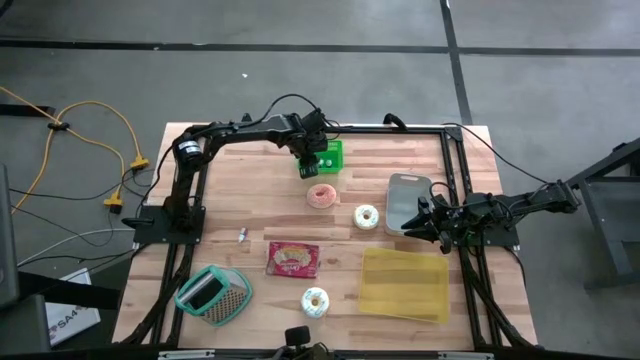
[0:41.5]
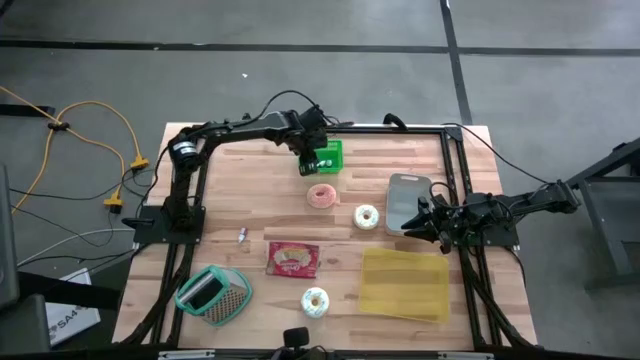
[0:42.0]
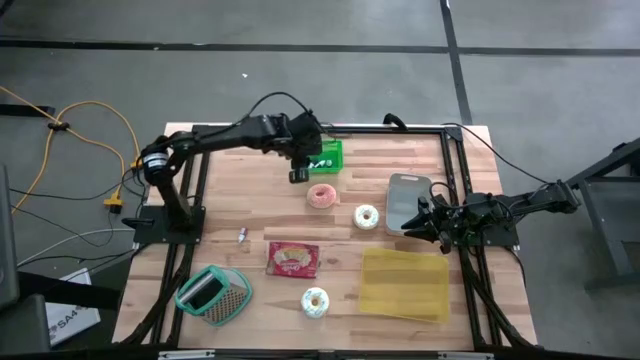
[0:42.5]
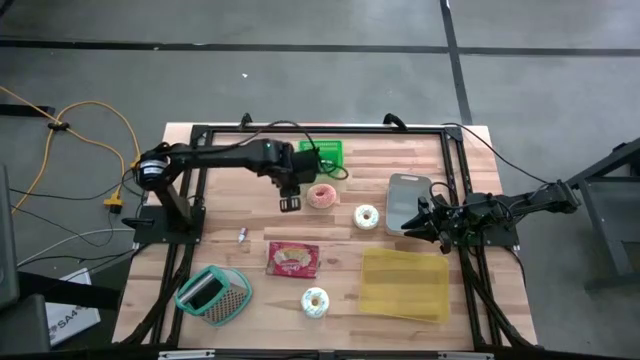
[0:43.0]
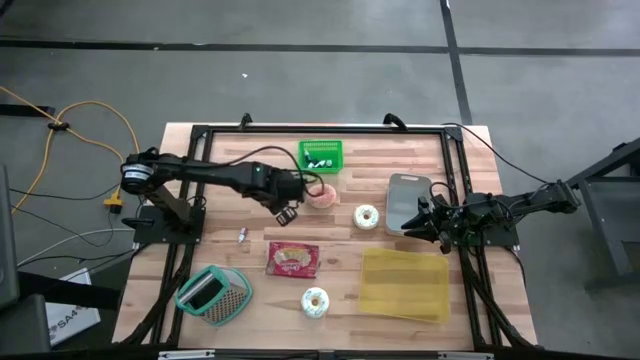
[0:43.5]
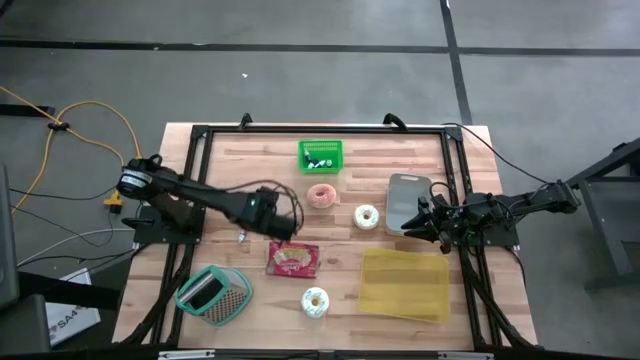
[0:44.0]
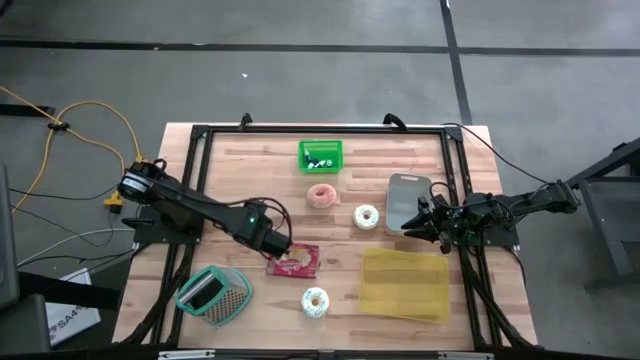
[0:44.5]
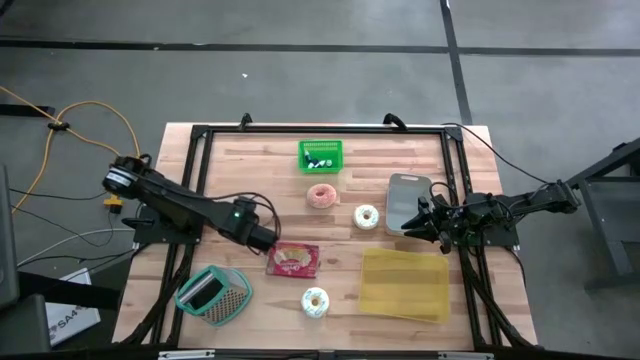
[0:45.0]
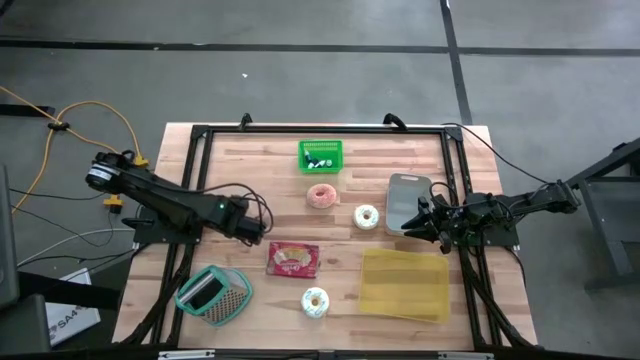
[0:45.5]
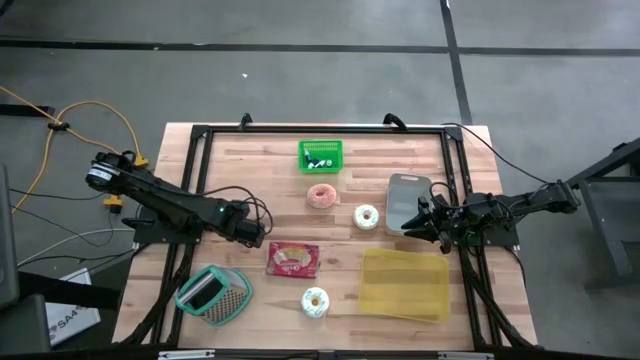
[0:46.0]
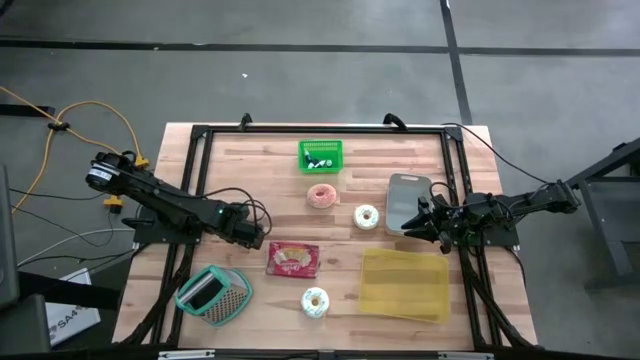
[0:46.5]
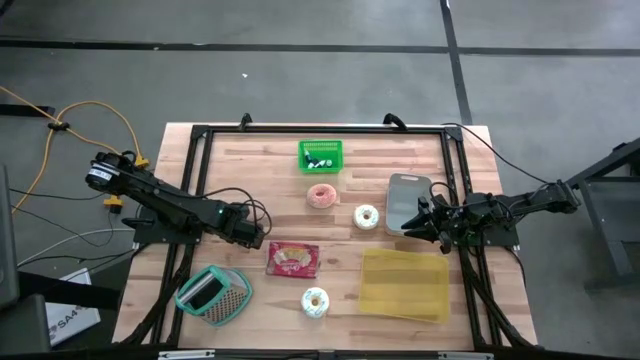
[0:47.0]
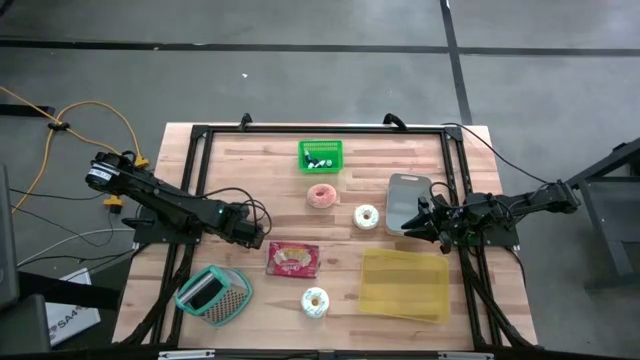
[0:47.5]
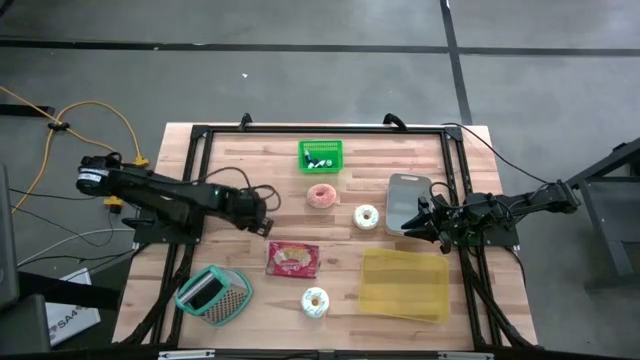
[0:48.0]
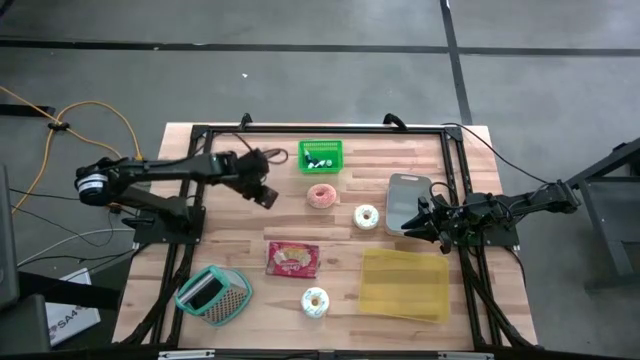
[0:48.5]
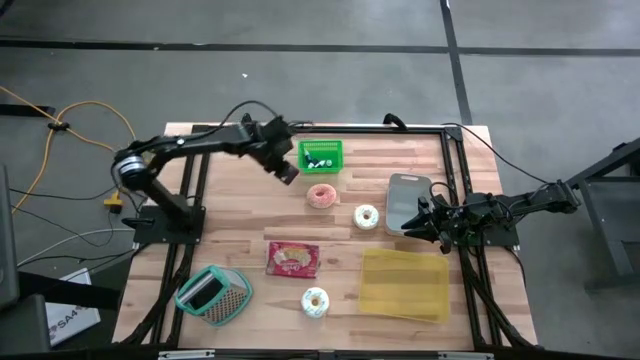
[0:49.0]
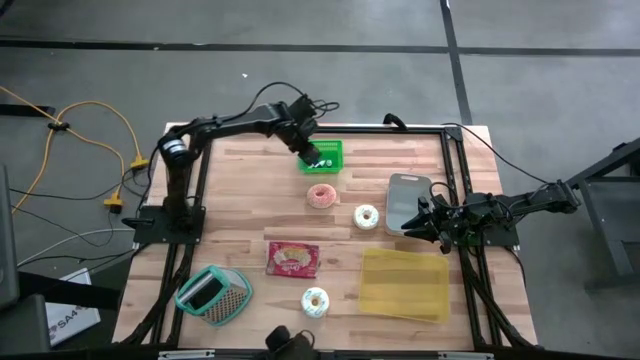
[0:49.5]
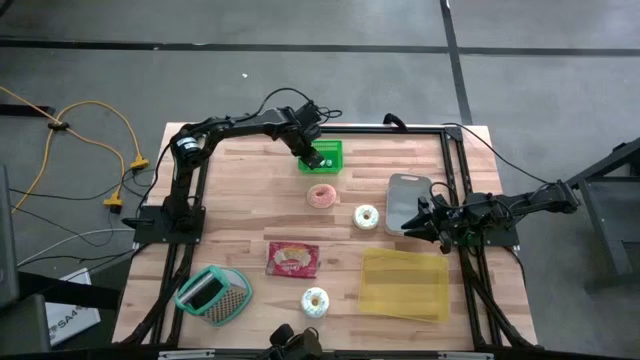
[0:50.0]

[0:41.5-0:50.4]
Put the red food coloring bottle into the green bin

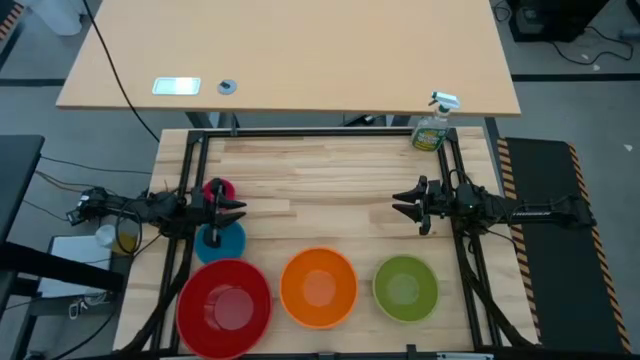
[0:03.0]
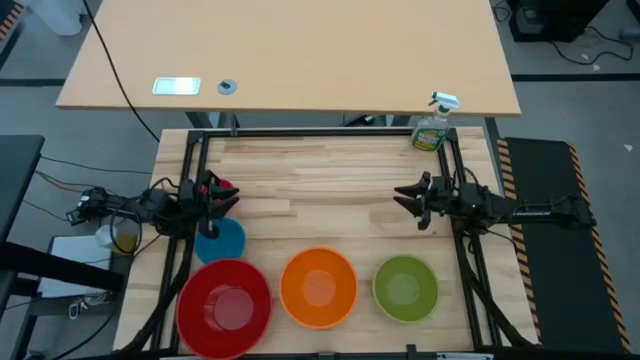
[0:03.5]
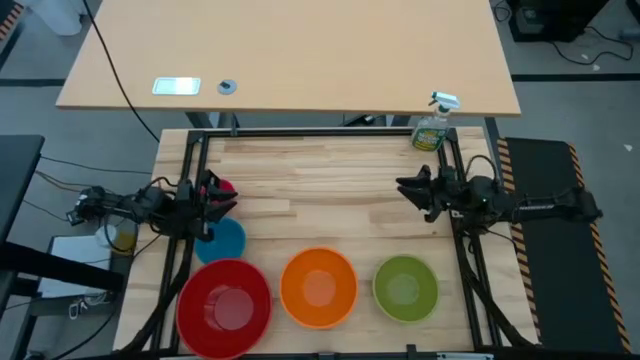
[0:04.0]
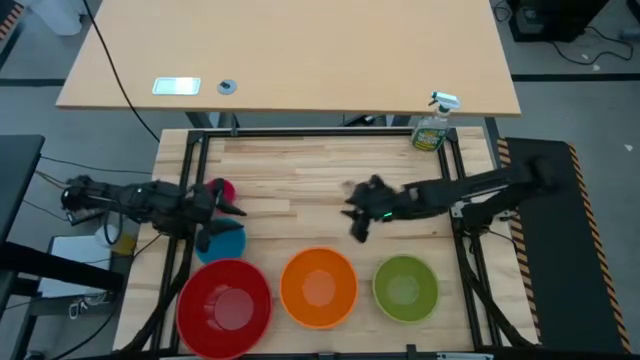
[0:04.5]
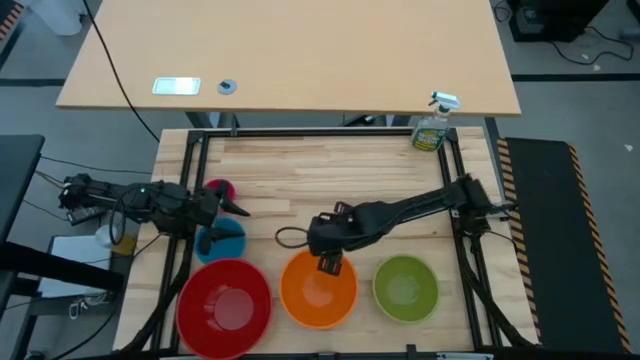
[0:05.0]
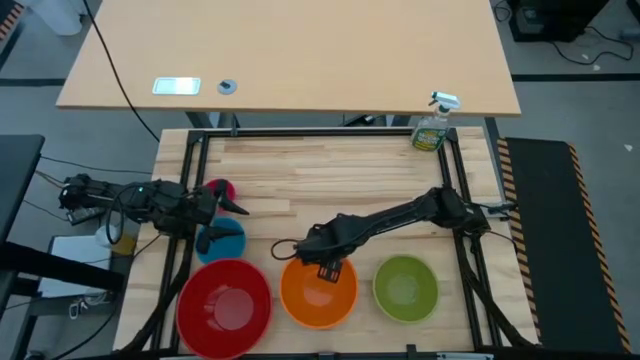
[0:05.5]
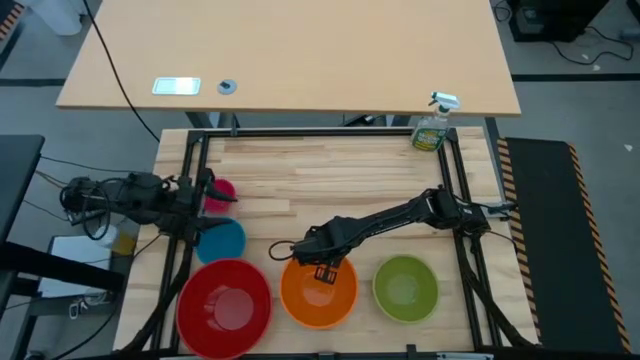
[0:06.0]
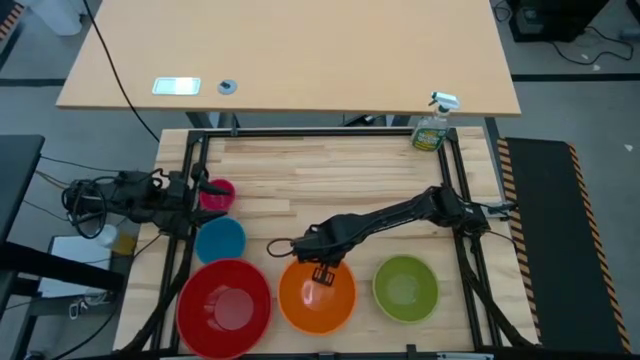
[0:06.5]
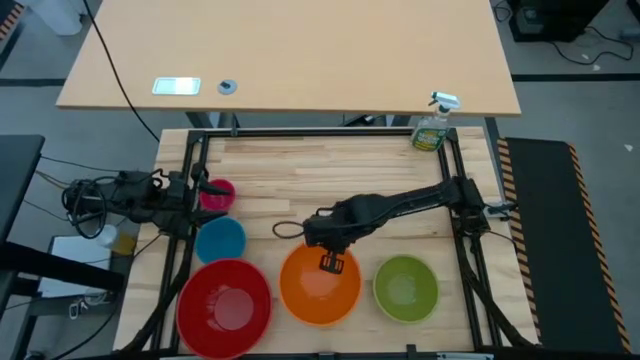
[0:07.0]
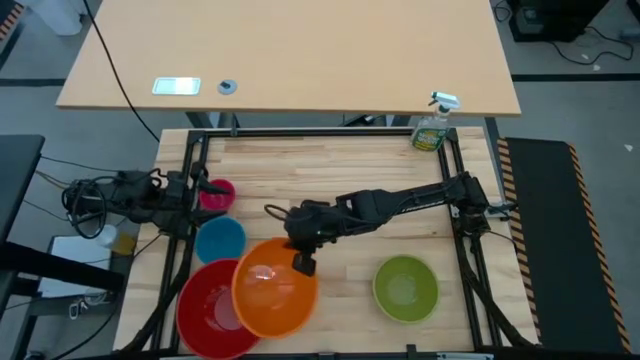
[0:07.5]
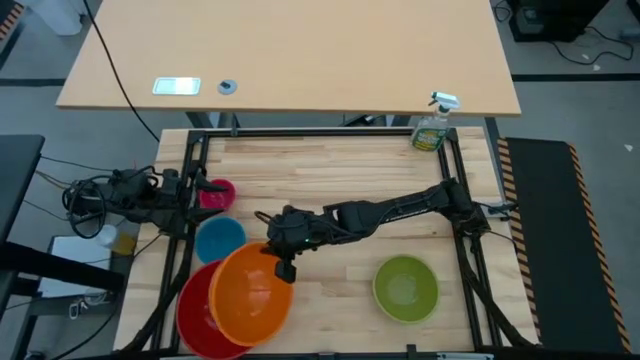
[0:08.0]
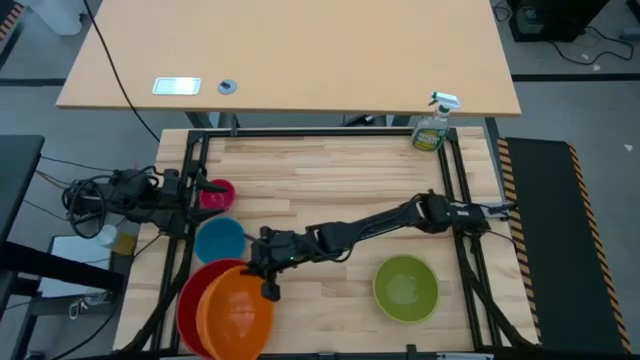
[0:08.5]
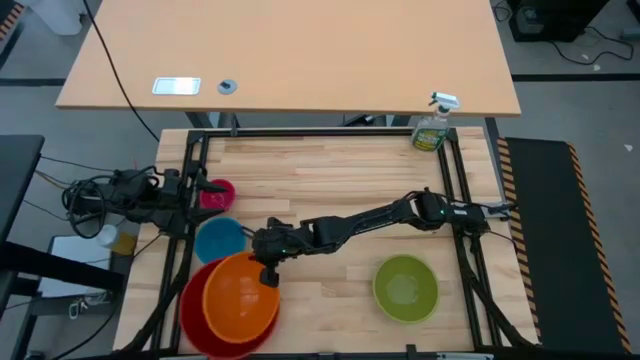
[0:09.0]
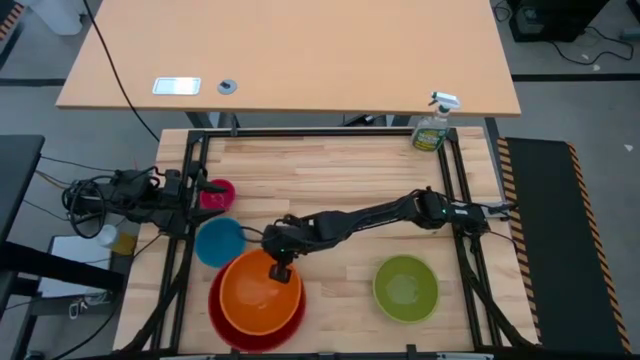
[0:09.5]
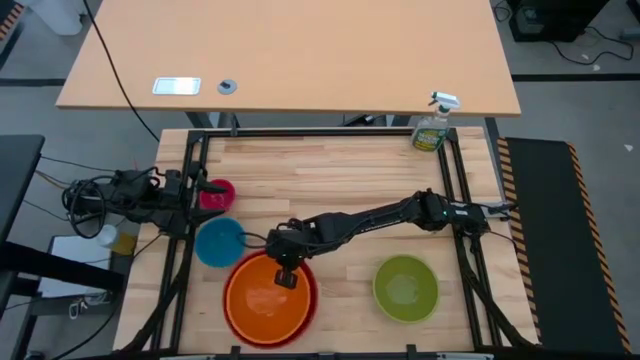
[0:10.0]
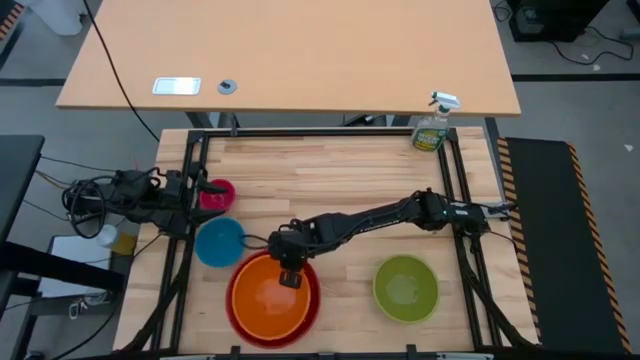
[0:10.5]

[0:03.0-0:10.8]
Stack the orange bowl on top of the red bowl

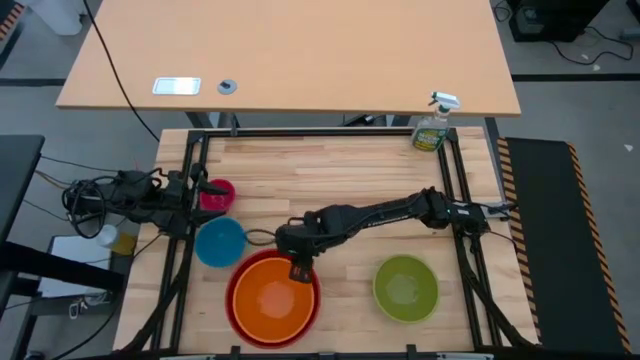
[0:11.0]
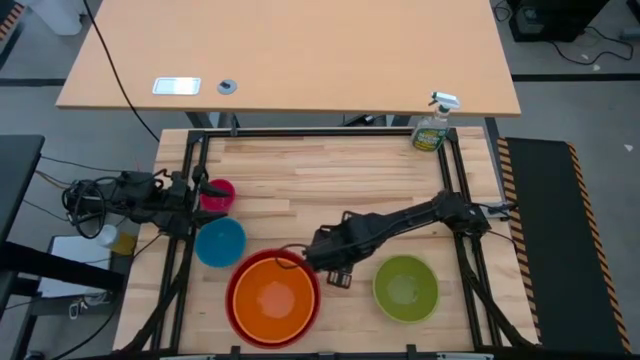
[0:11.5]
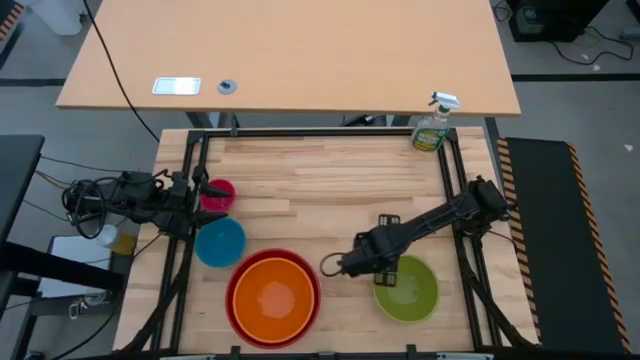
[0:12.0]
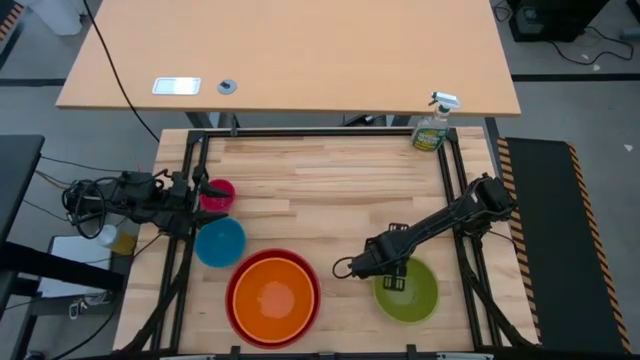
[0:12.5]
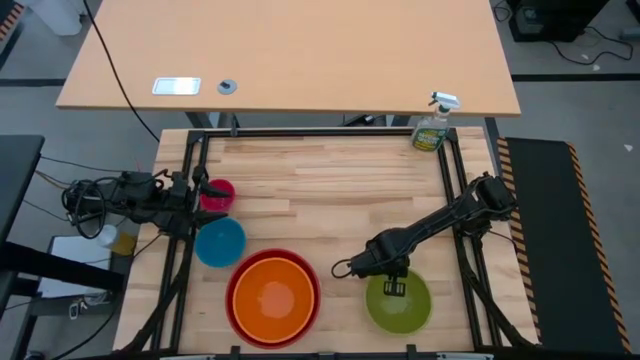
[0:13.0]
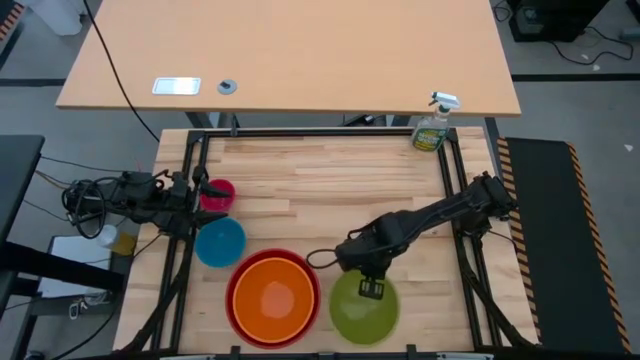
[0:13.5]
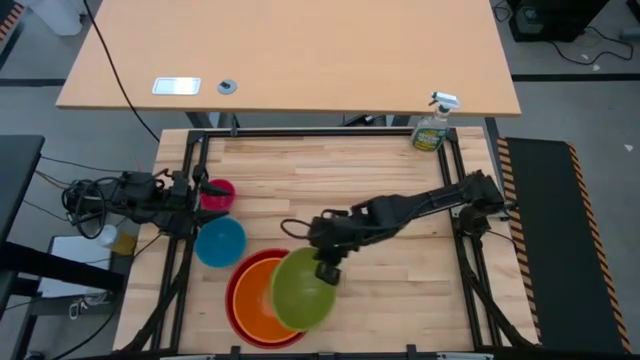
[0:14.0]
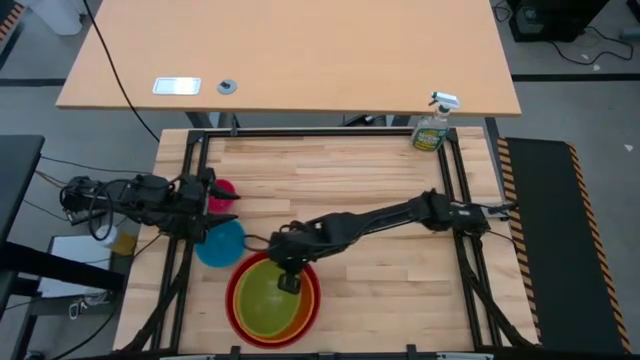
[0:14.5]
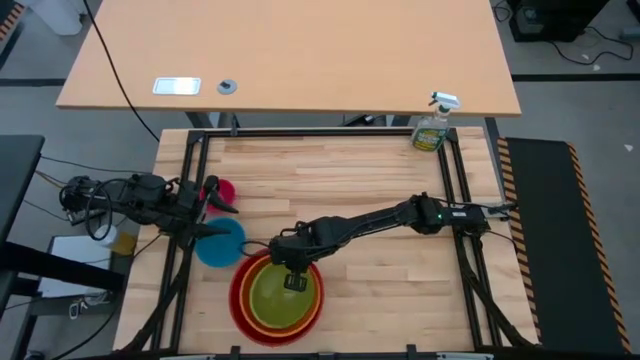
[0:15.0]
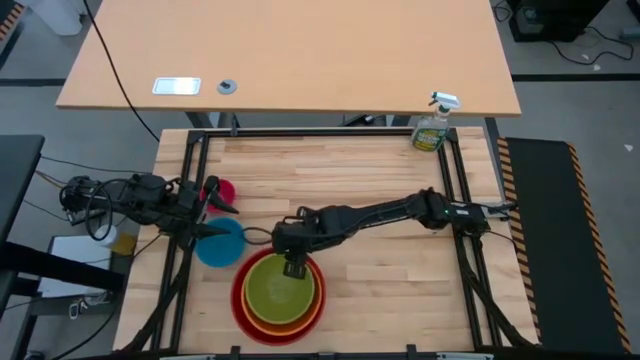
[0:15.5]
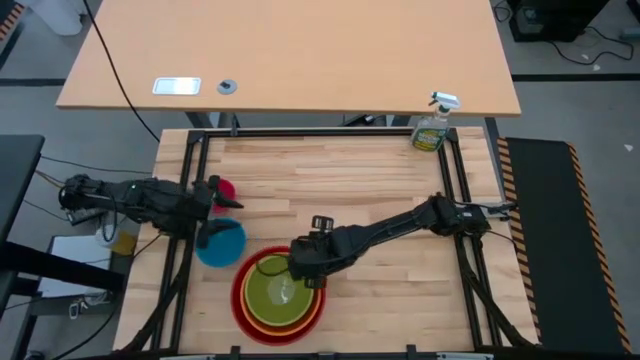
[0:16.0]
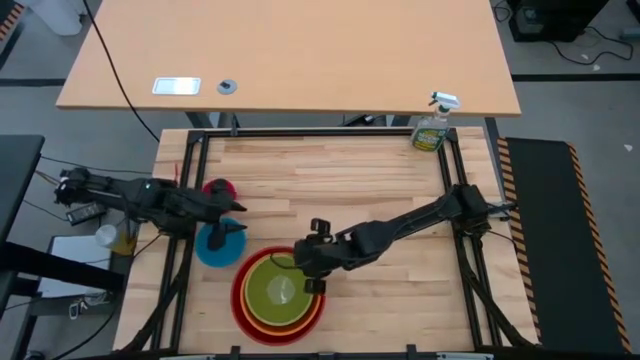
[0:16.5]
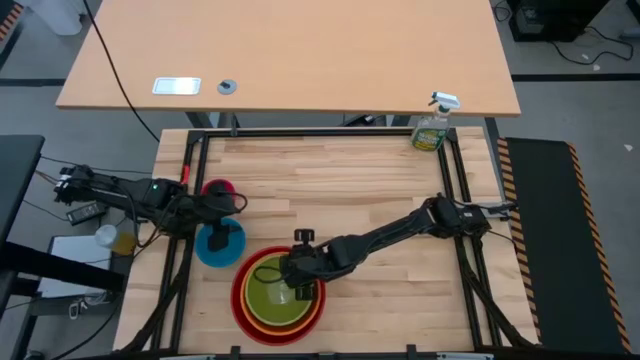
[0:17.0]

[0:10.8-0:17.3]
Stack the green bowl on top of the orange bowl
